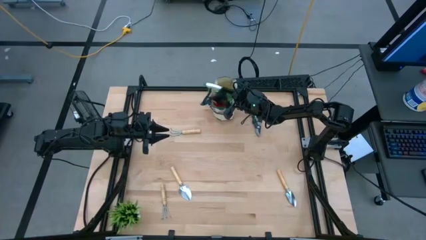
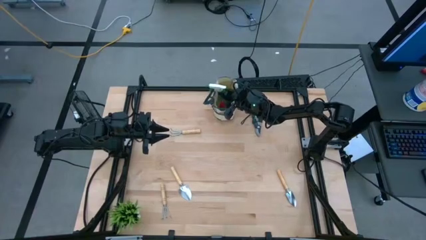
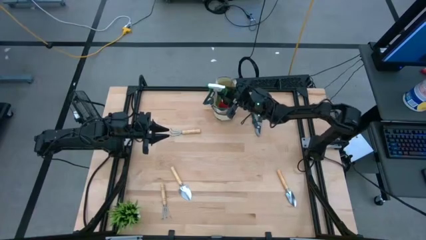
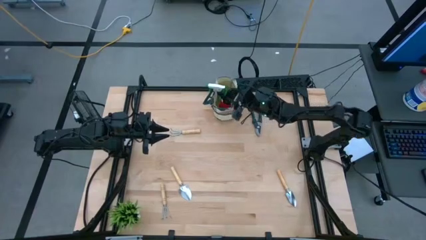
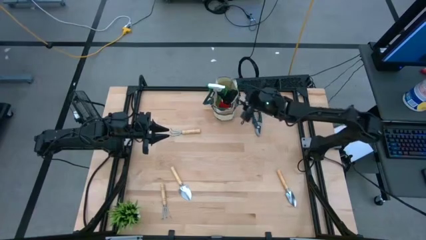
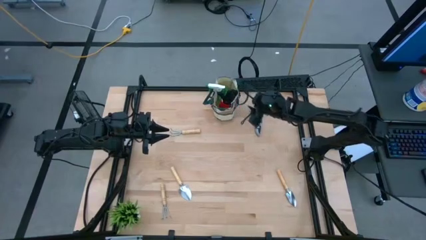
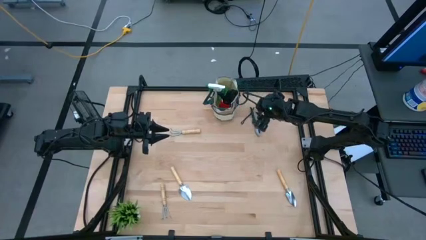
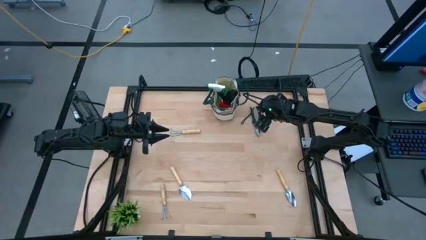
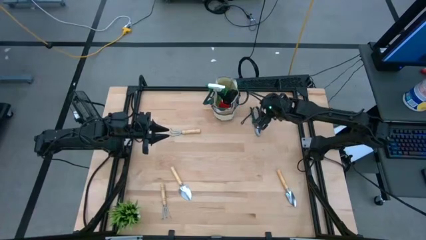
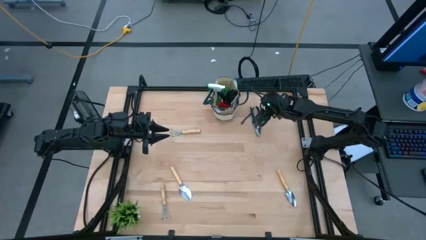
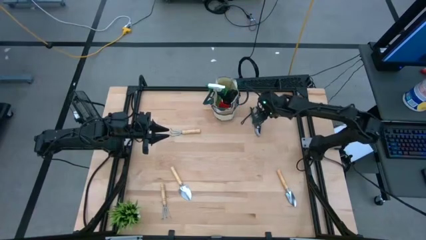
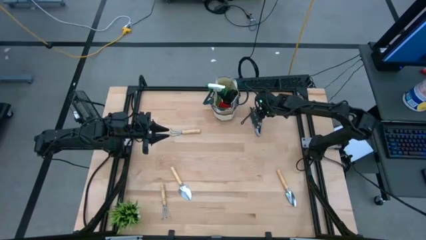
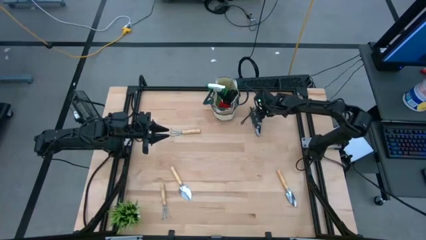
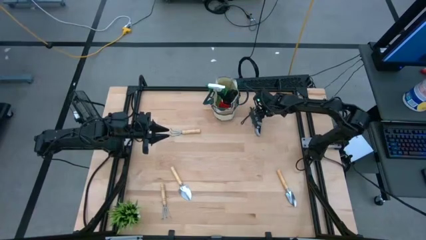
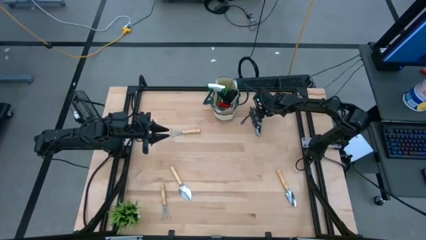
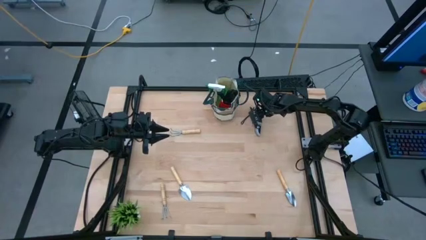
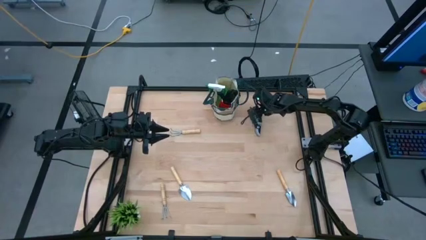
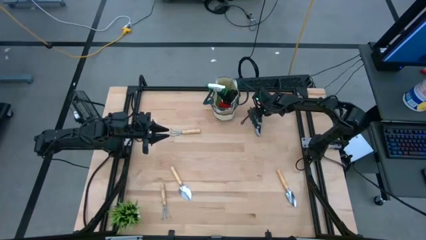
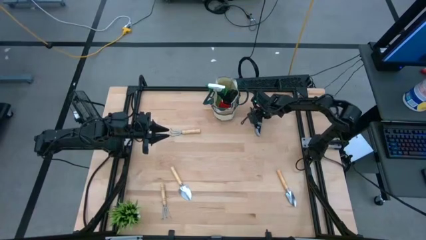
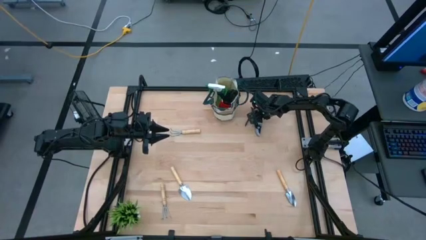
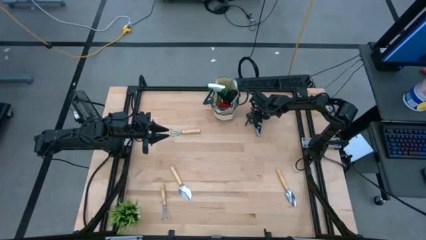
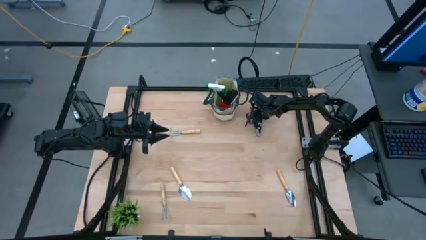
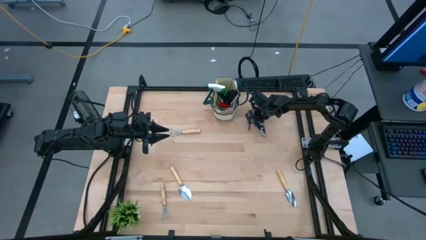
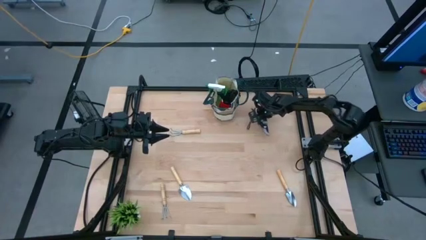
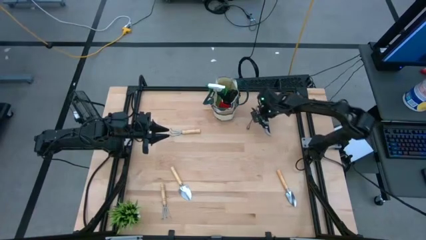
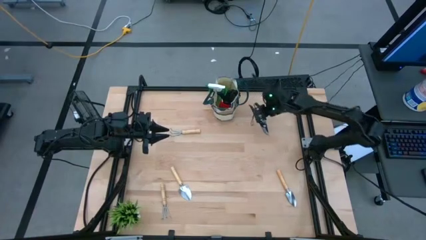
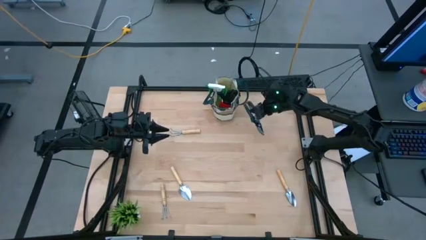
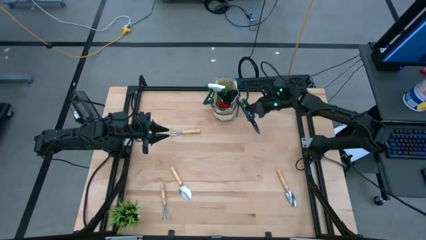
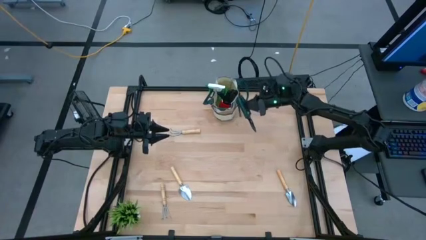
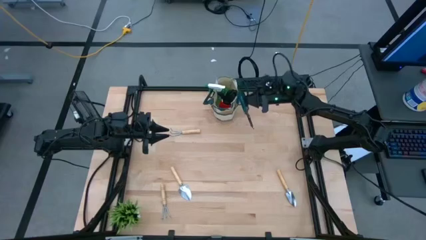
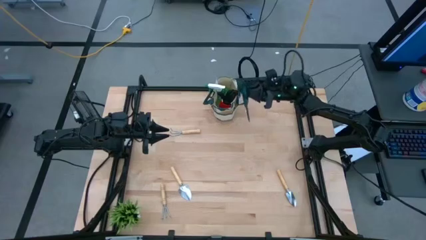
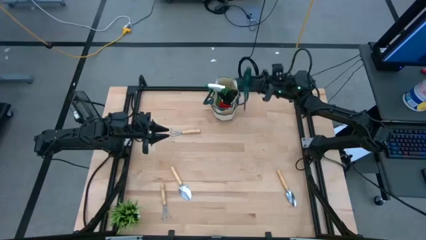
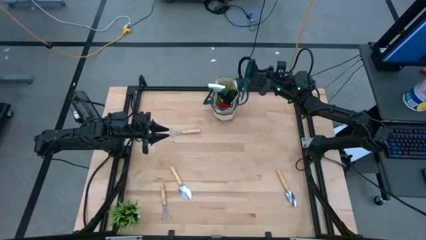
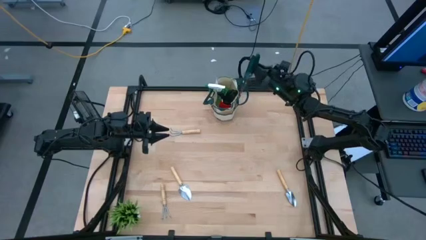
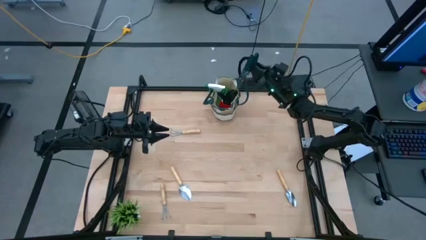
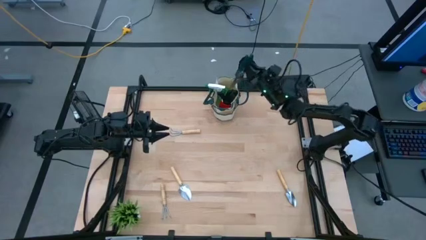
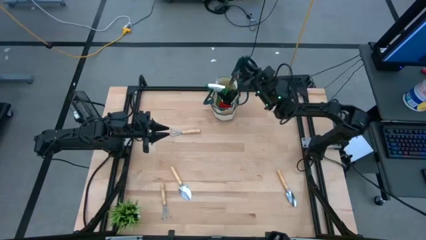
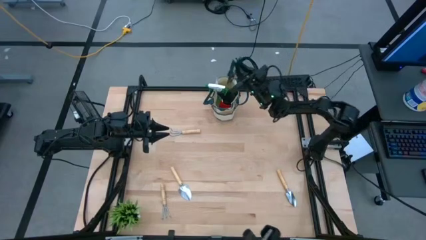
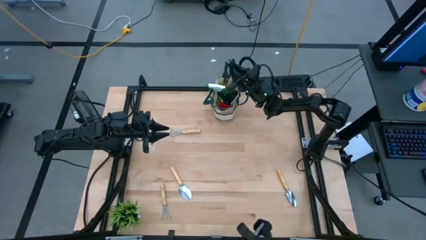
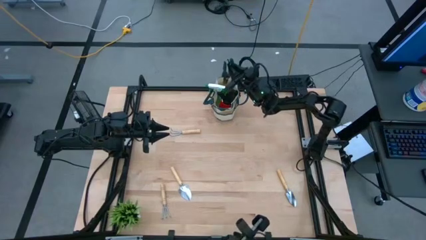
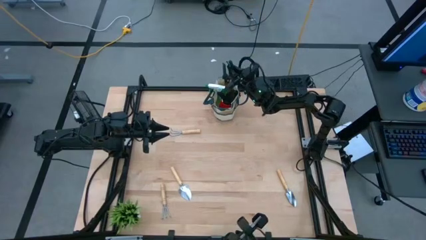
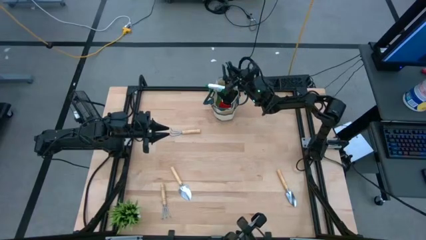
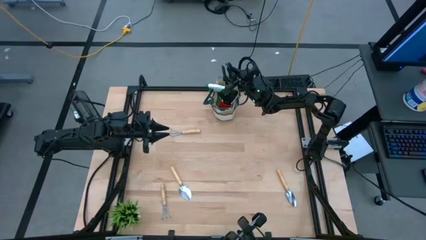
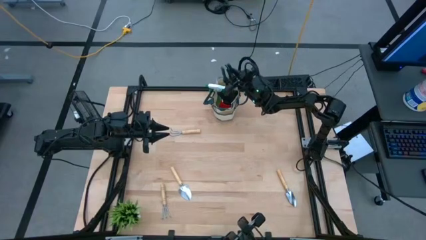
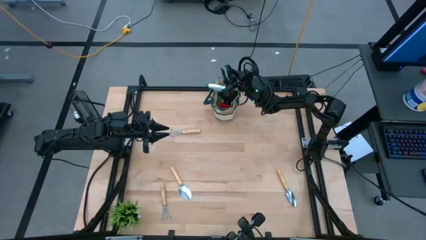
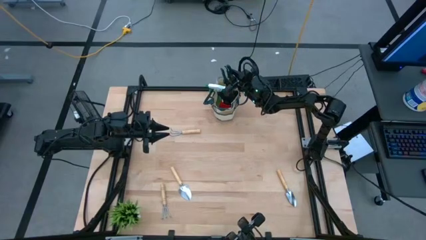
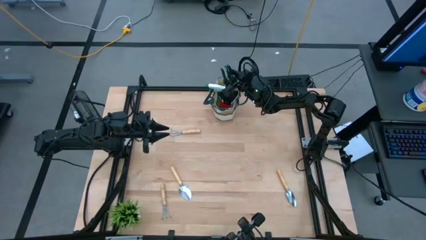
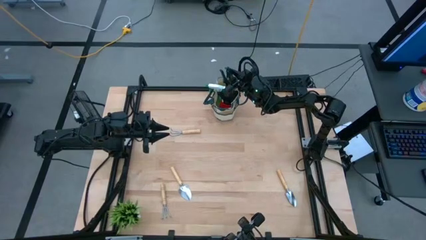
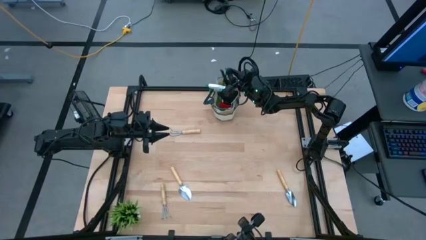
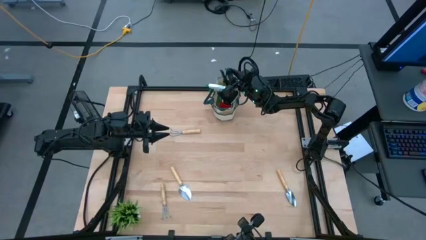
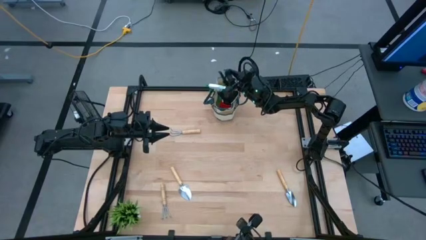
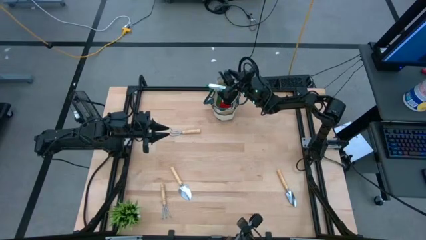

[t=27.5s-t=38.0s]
Task: Pick & Place Garden tools in Gardening bag
Put the green shears into the gardening bag

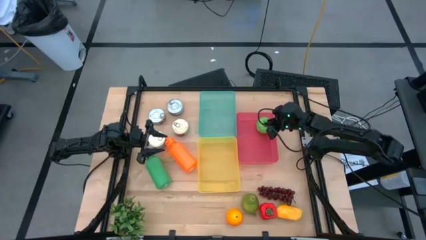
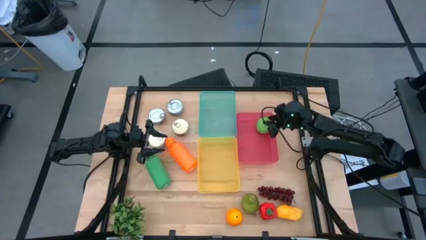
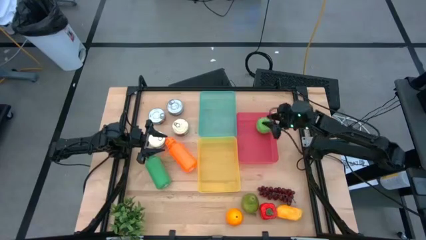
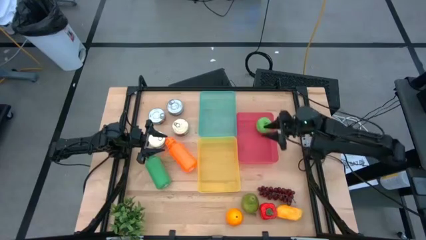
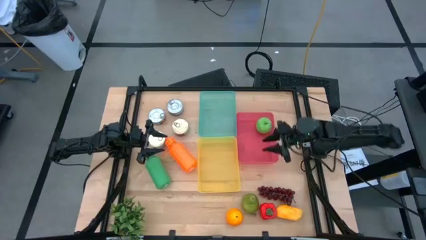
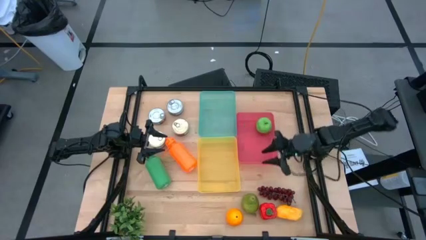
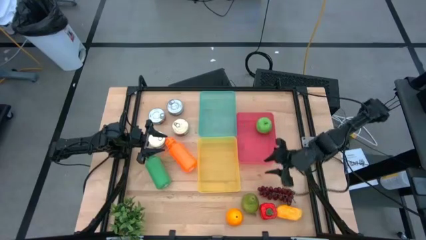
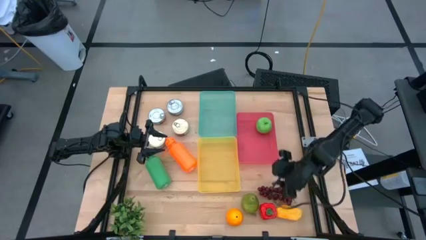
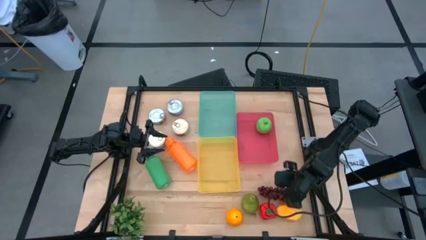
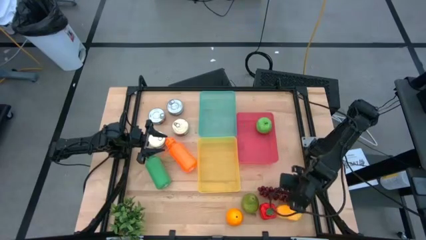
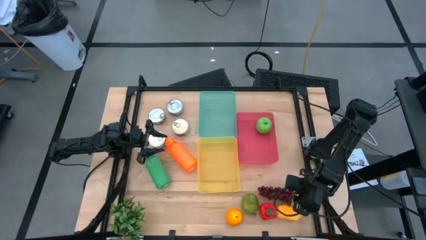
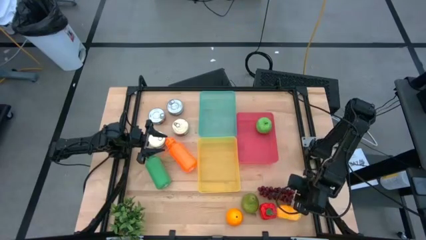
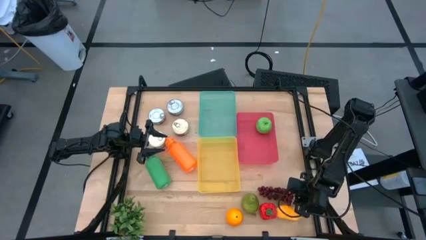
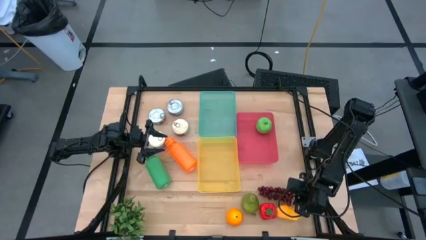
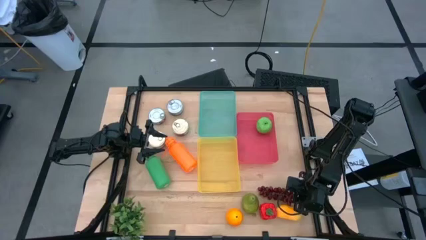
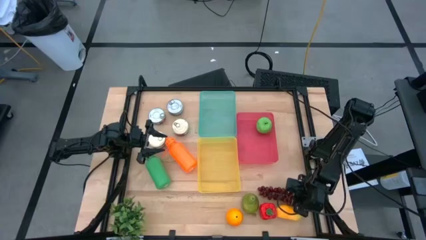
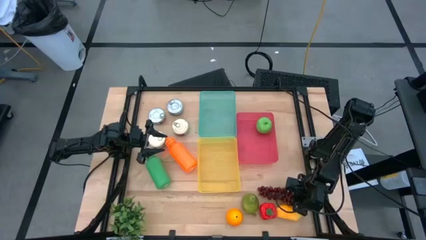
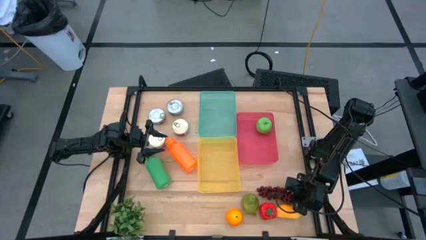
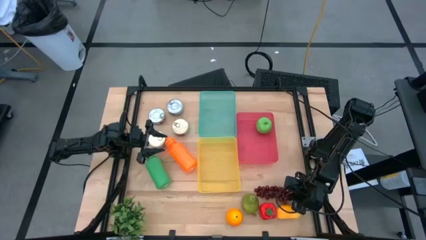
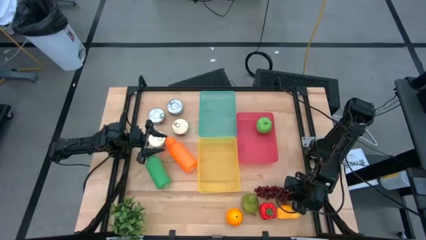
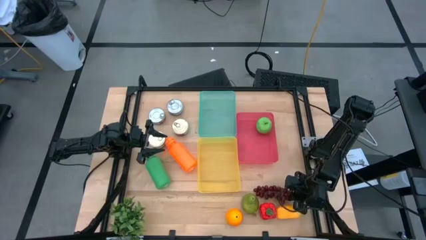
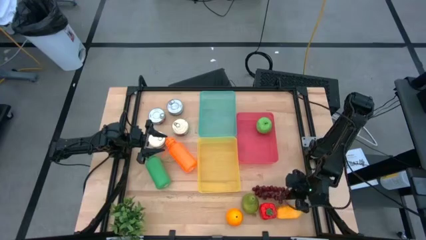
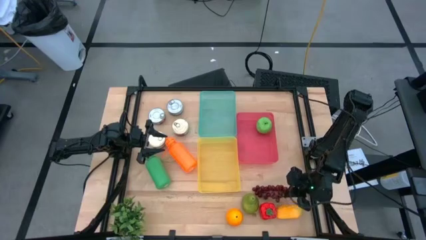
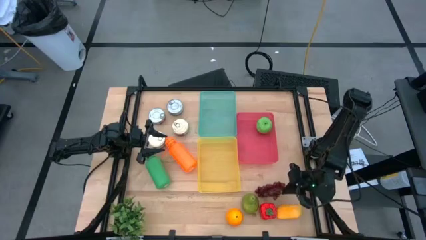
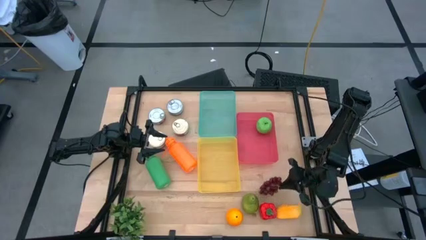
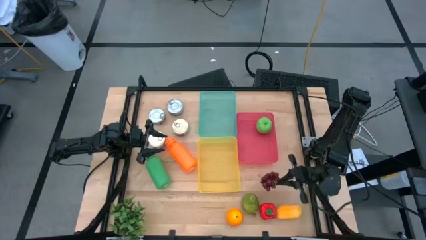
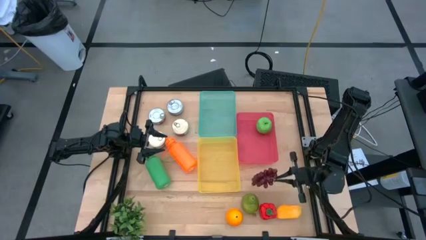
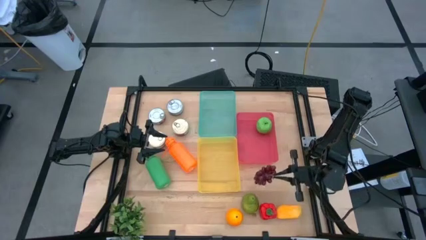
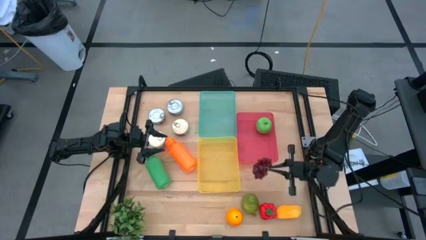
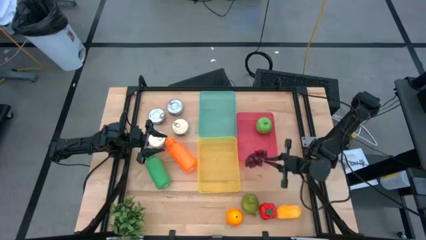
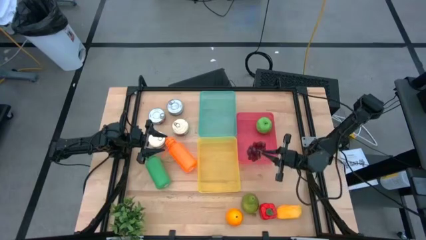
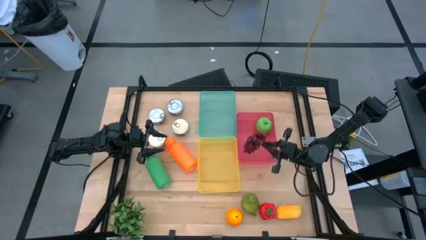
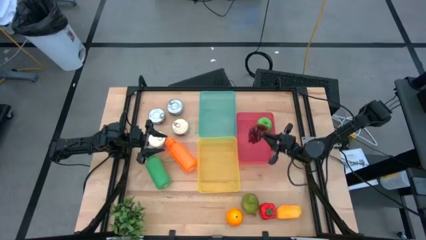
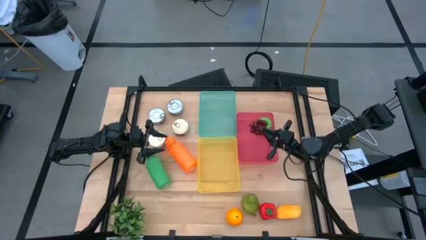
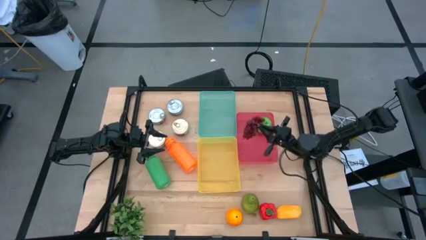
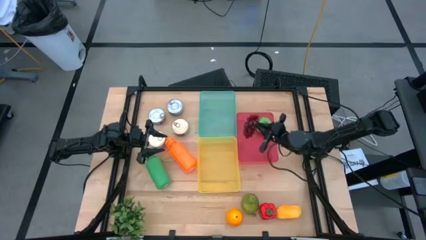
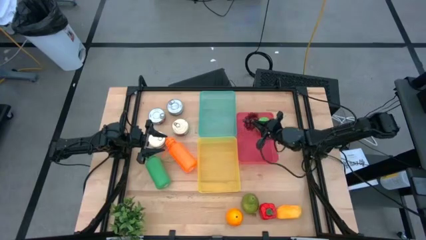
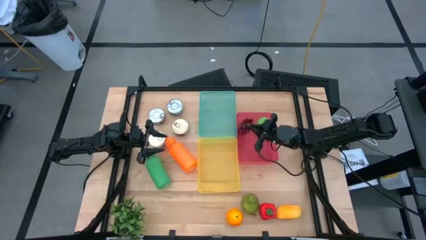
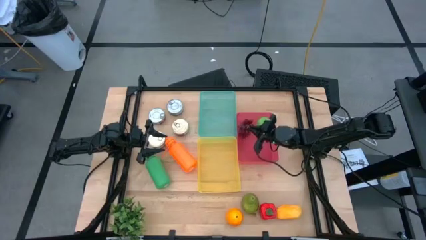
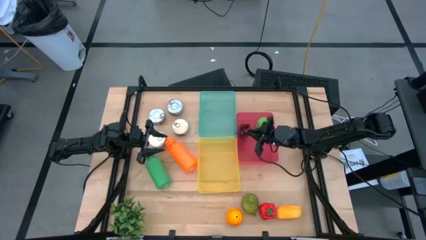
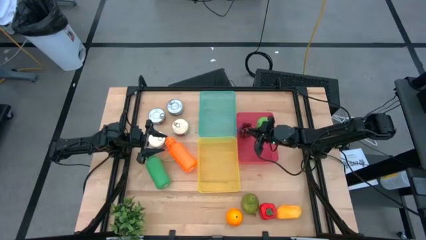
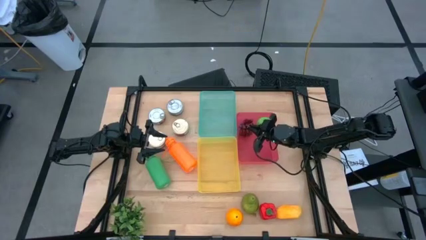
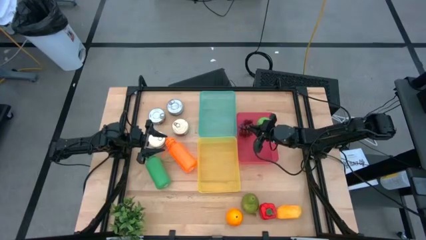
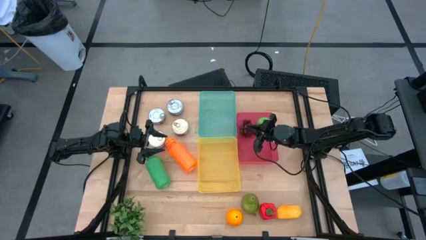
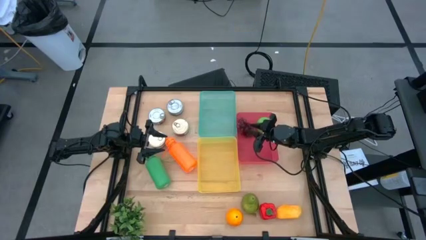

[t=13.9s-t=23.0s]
Task: Pick & Place Food Item
Put the red grapes into the red bin
